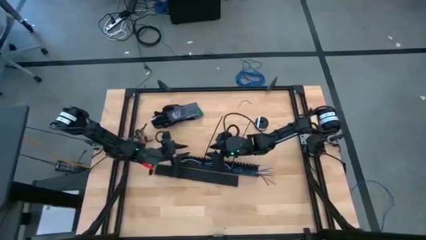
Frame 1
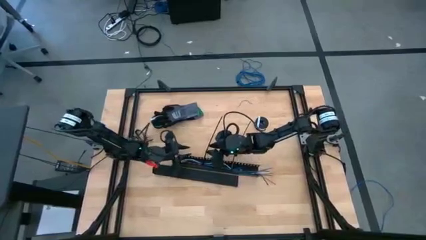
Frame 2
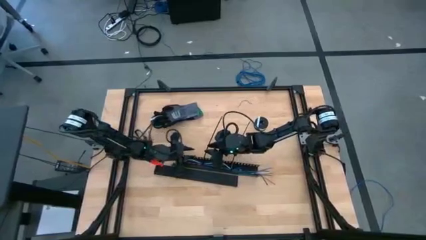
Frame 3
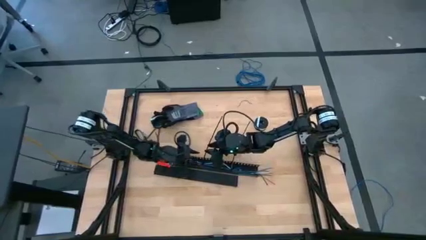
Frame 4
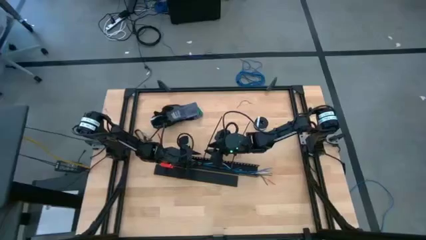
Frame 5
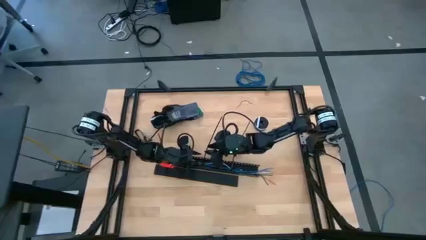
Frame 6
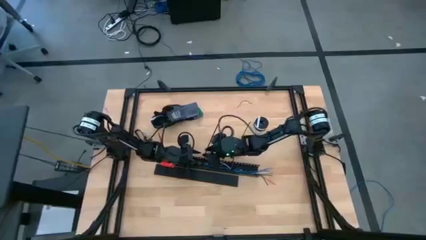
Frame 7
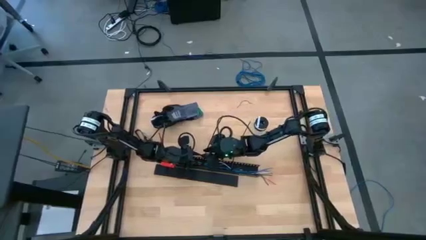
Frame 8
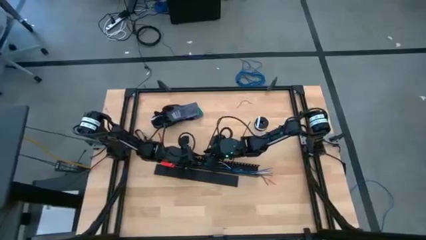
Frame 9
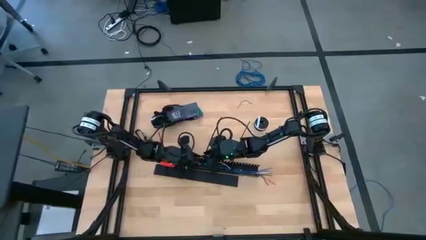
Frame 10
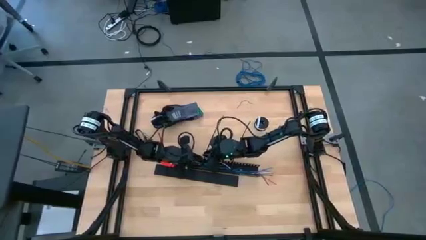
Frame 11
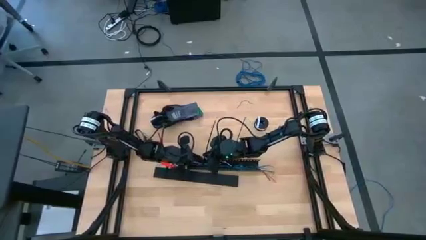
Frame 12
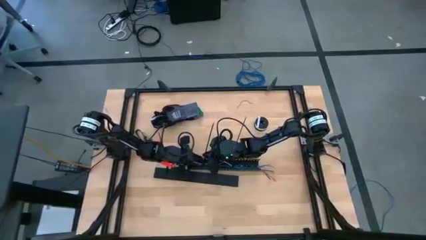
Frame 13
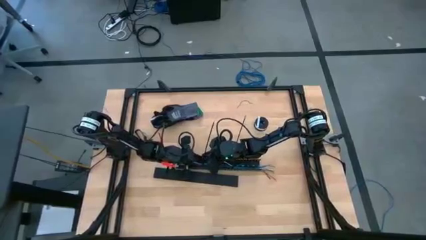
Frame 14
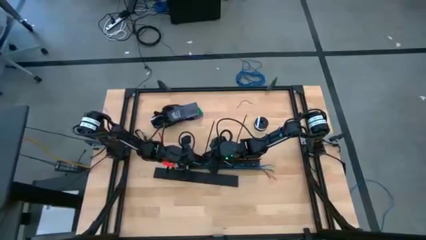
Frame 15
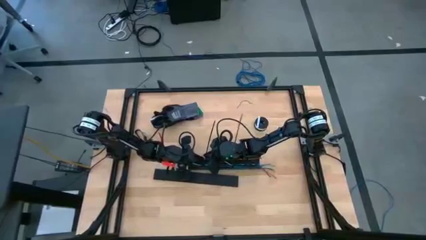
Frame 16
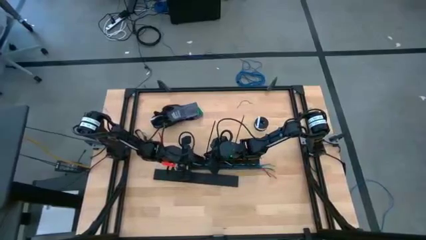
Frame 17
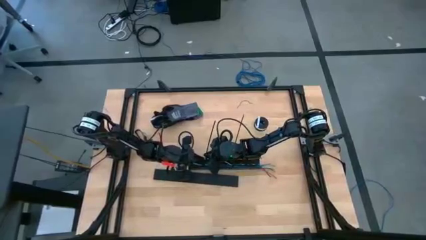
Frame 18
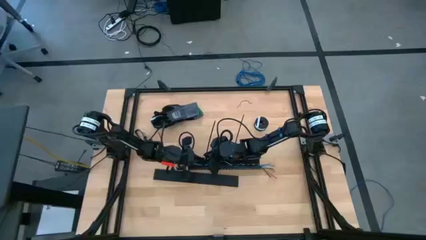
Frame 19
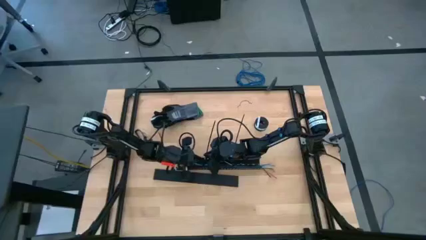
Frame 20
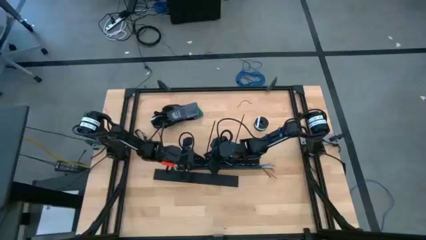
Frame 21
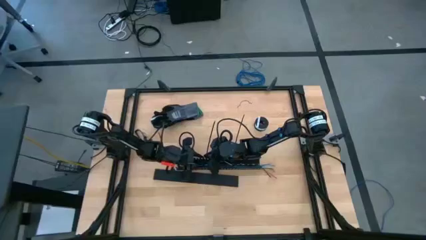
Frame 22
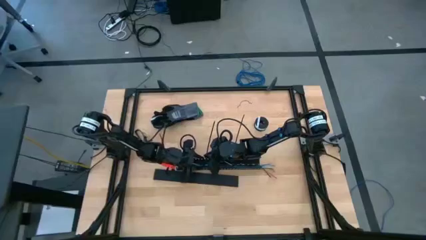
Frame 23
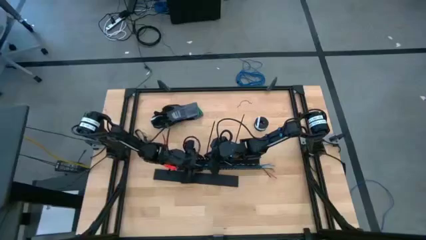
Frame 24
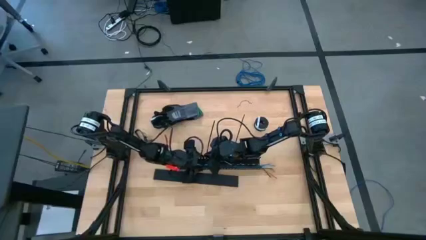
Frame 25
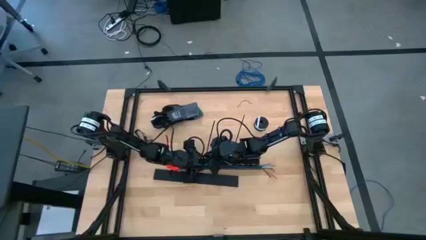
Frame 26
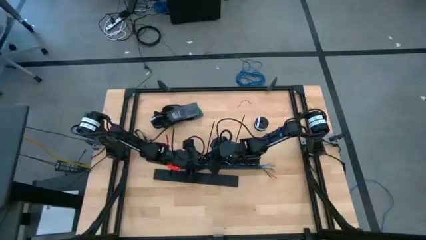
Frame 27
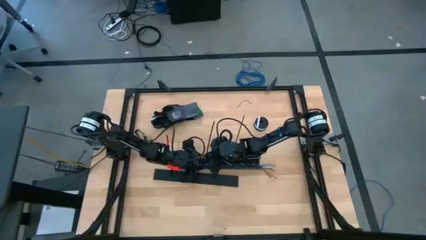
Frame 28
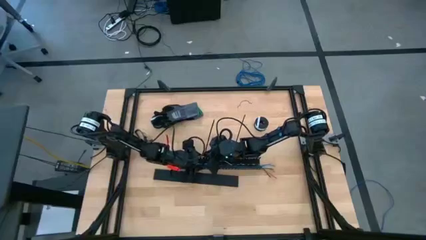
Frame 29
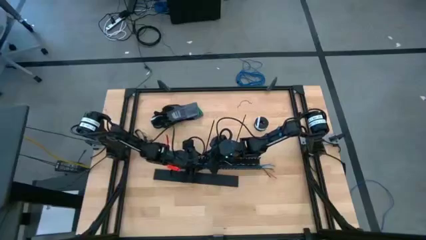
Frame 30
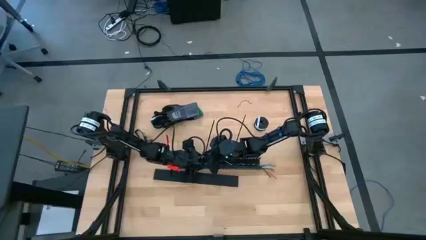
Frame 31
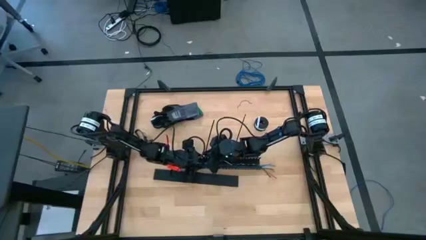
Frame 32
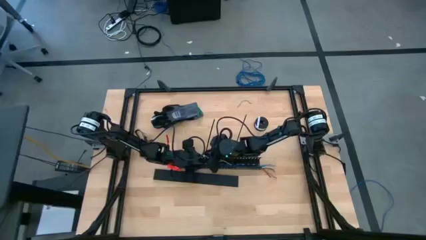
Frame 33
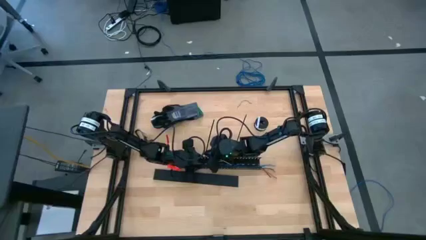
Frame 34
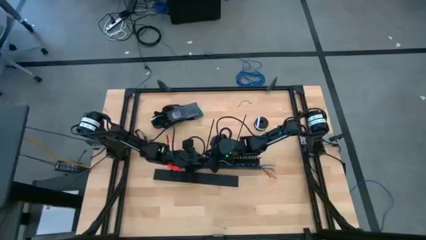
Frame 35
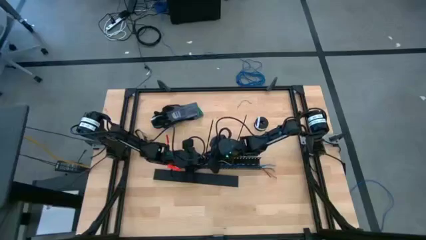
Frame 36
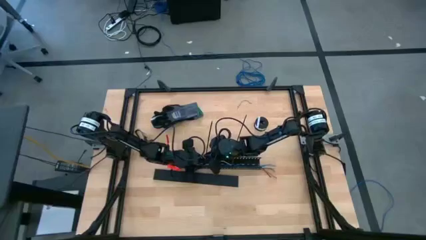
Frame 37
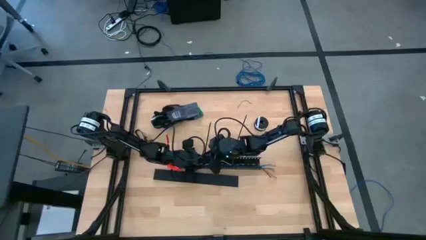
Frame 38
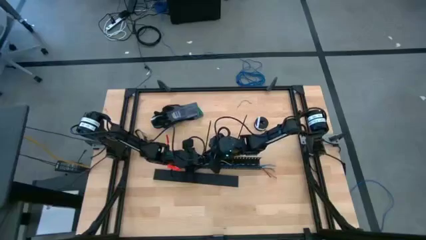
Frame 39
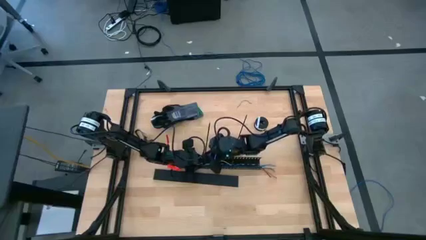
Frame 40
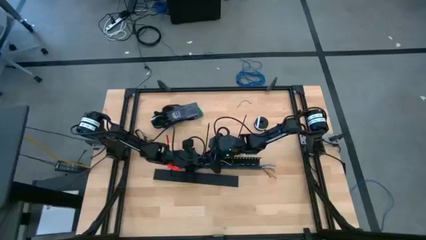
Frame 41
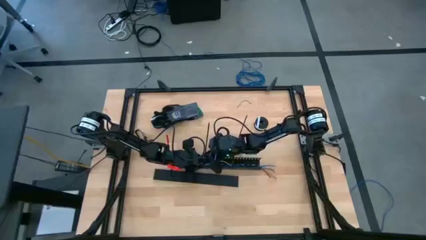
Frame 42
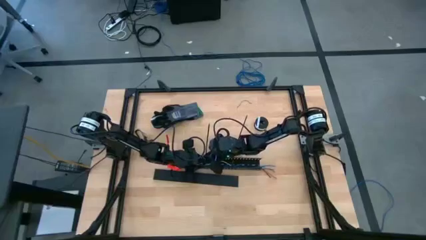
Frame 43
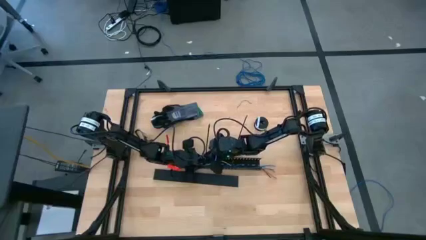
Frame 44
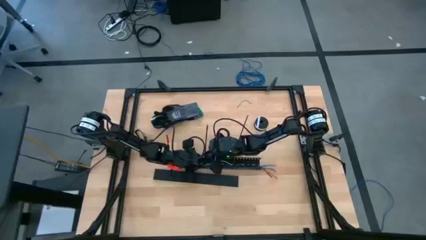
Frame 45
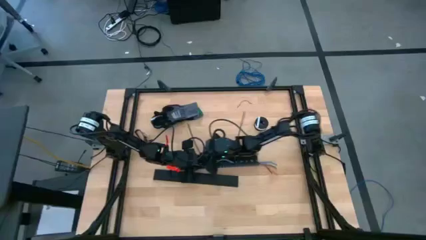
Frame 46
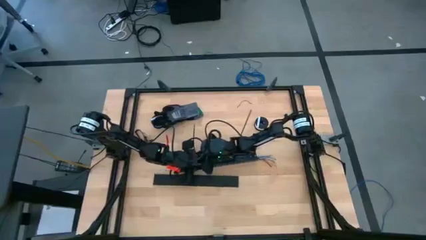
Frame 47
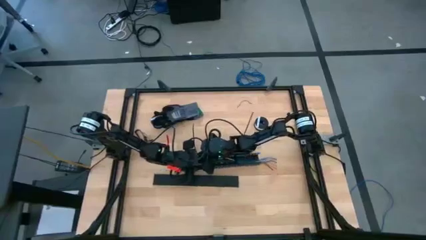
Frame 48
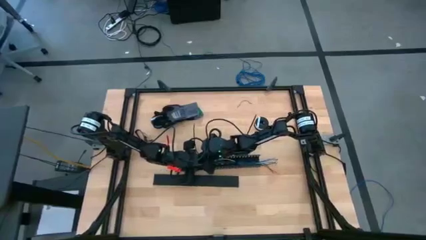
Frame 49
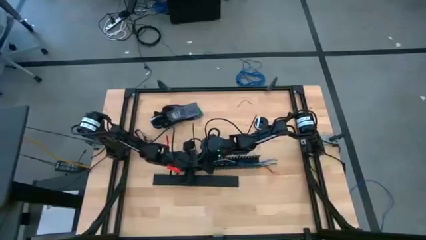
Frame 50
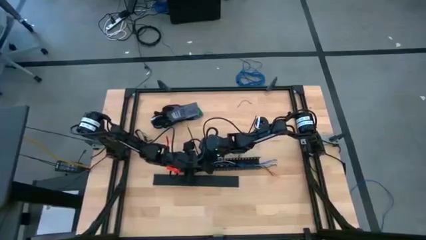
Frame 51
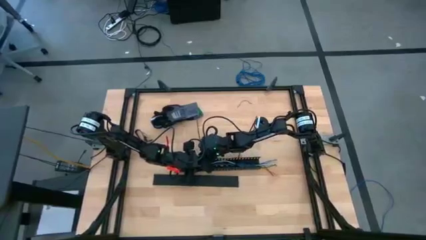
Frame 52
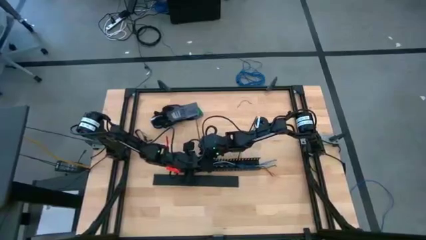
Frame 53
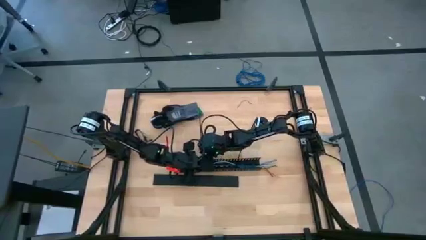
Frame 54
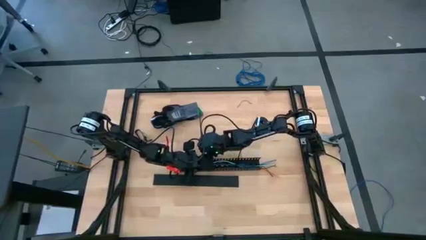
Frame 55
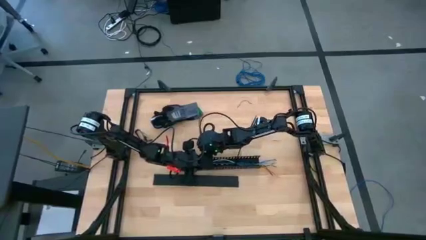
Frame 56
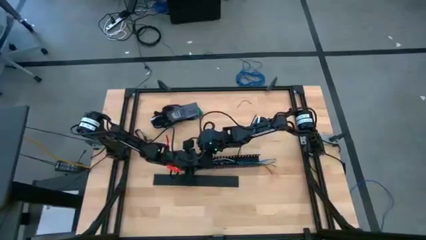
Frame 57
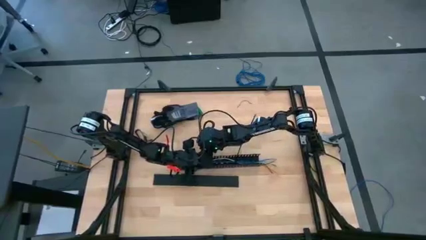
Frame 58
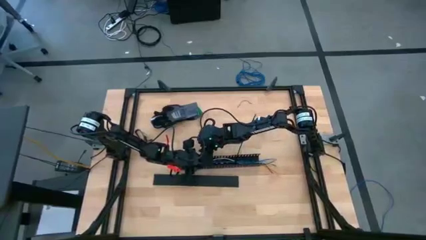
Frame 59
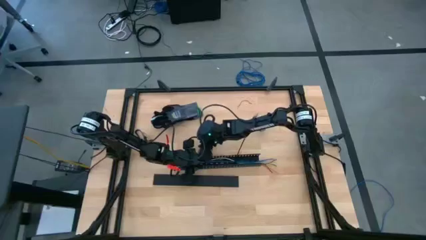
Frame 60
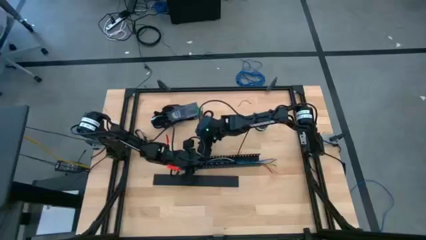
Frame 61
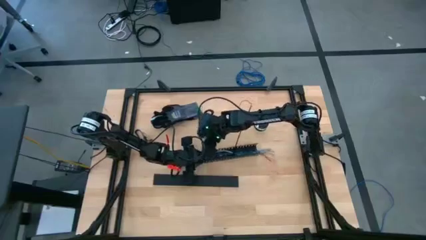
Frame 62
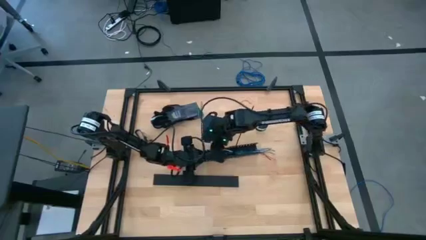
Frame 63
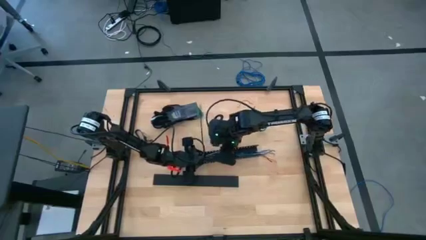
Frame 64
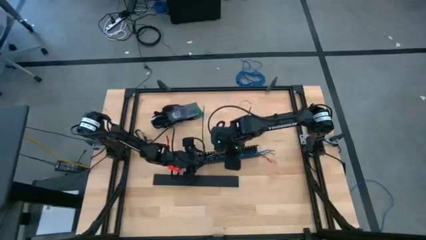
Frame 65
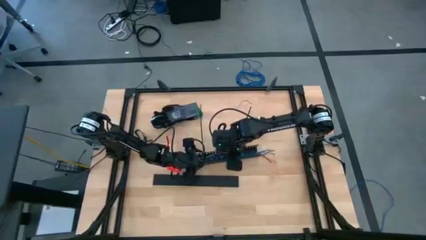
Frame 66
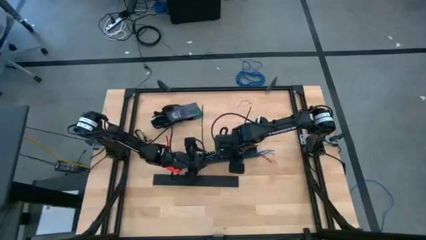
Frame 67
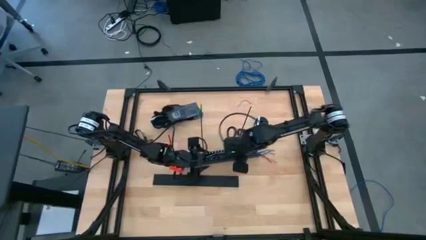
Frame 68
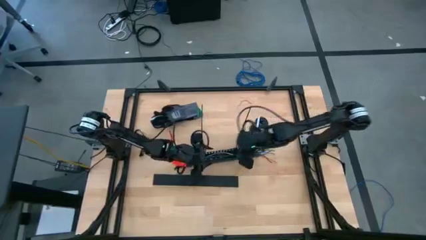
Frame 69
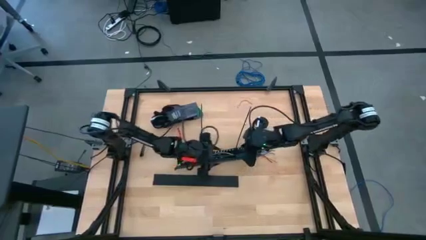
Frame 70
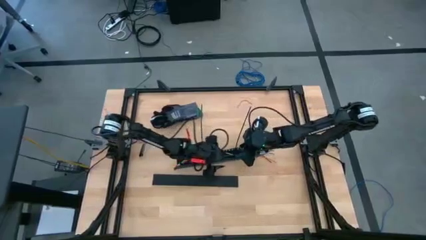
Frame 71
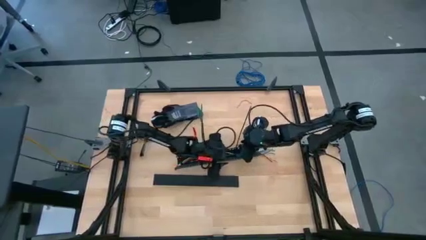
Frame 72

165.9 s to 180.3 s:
Task: Ziptie cables
Put the zip tied cables into the black cable duct
